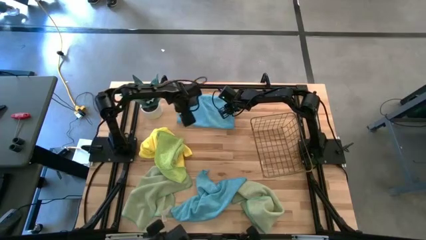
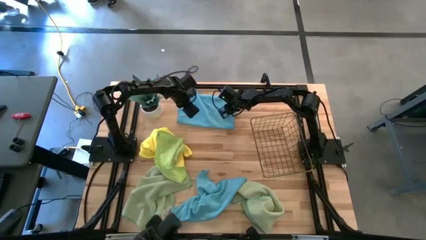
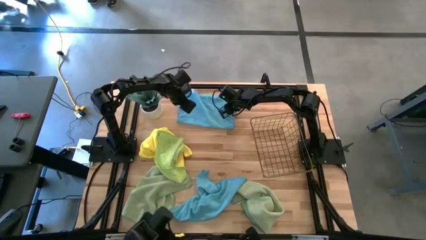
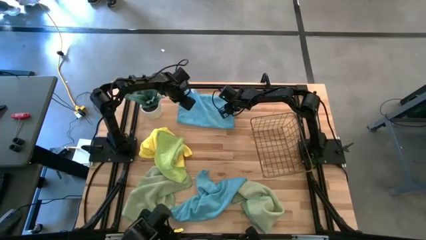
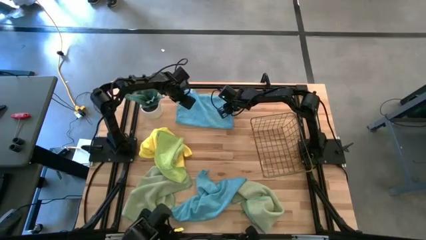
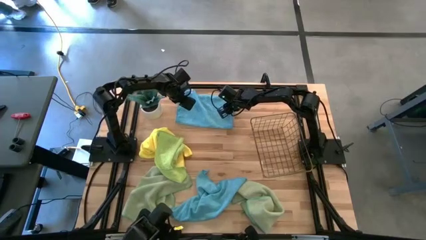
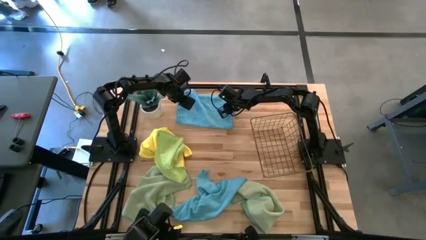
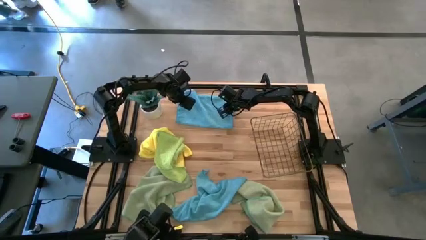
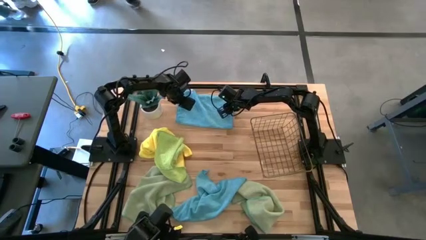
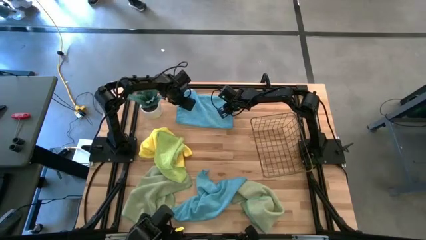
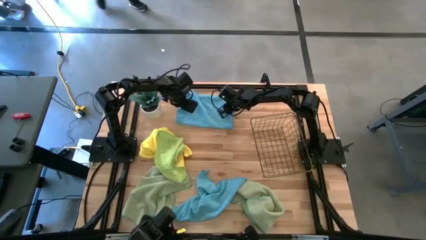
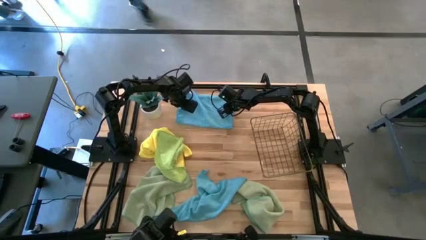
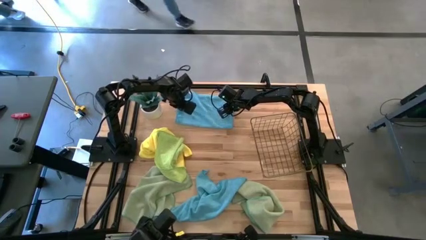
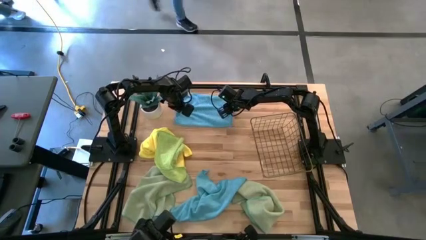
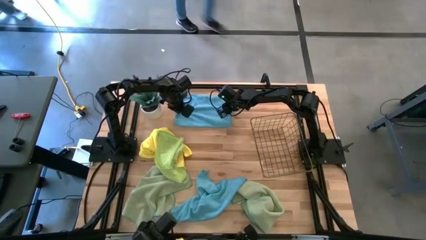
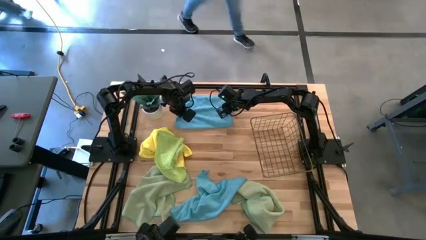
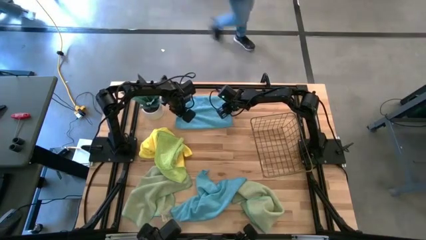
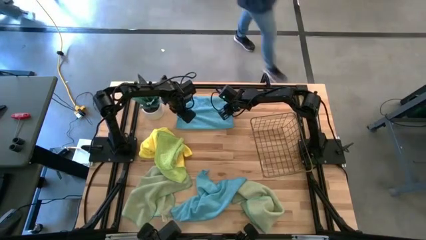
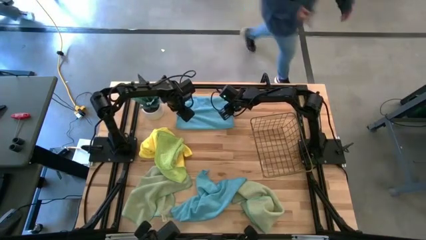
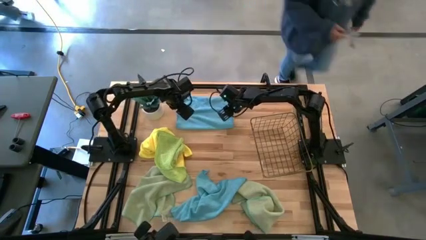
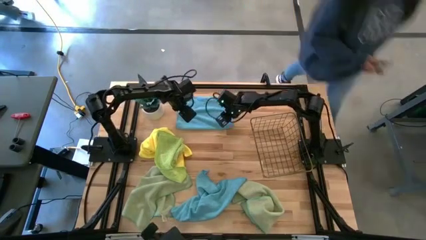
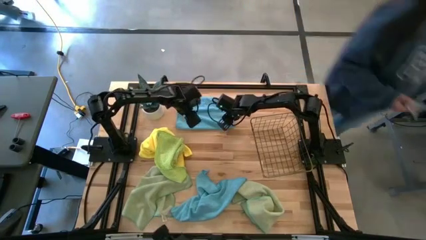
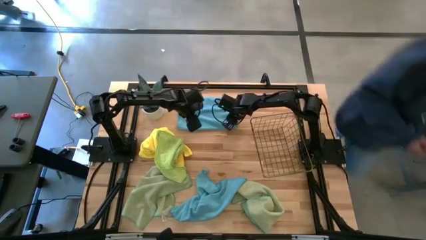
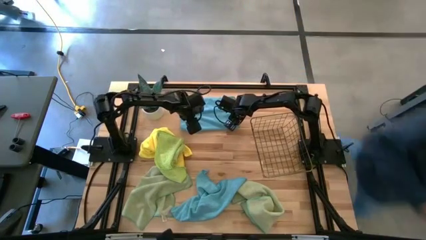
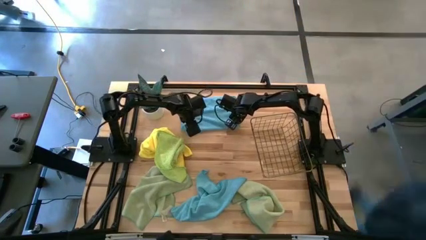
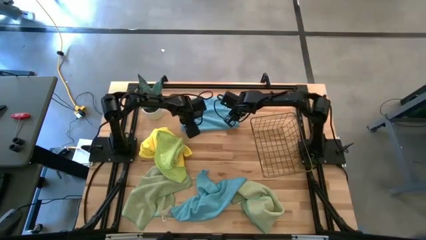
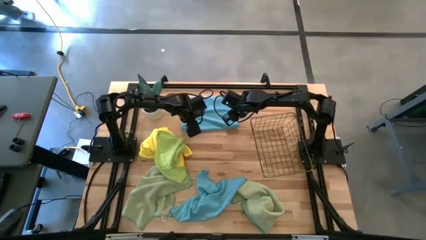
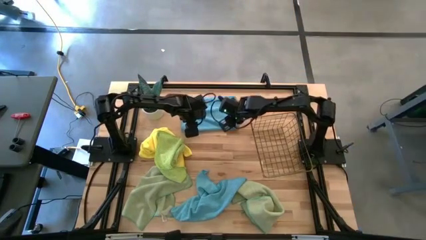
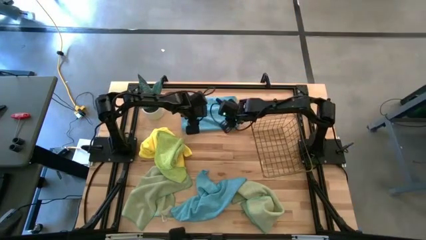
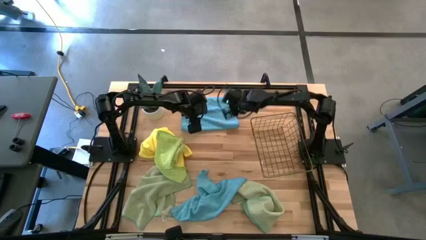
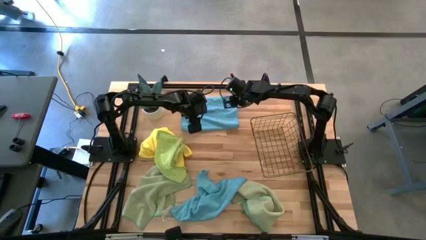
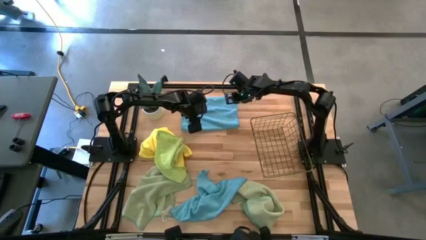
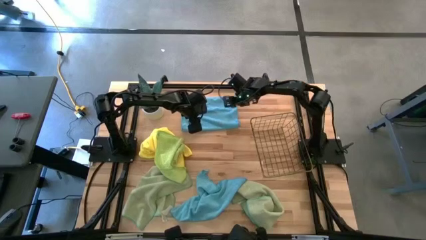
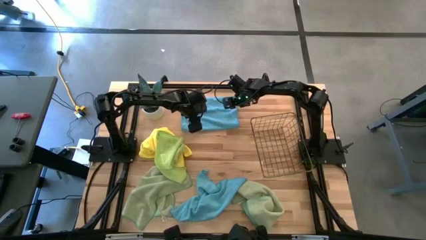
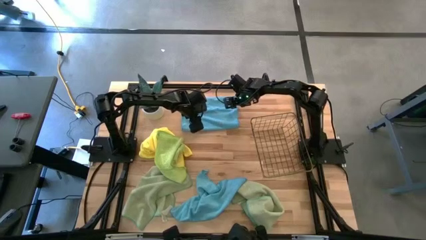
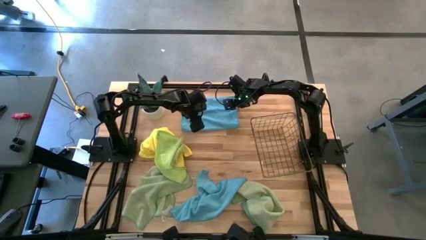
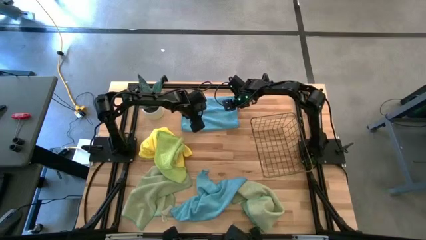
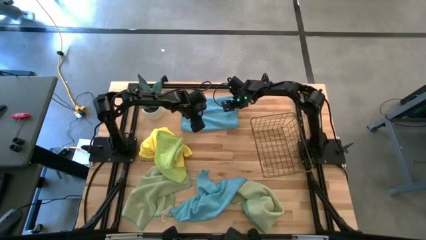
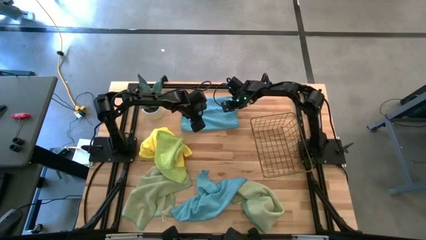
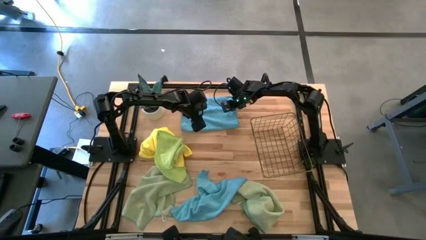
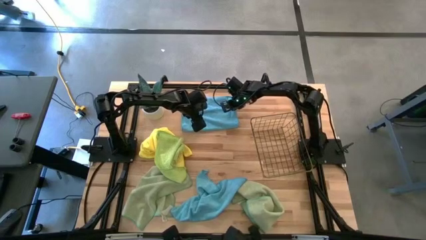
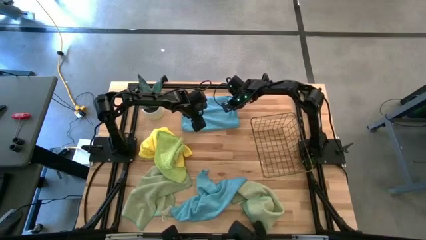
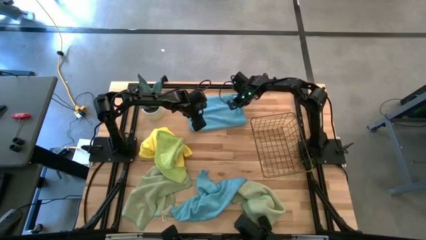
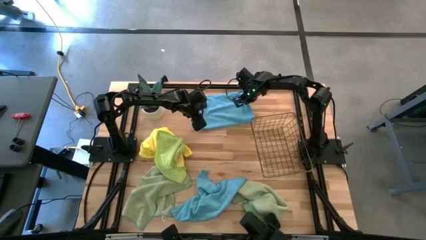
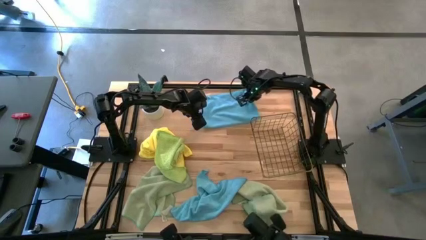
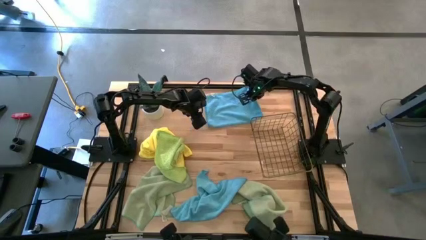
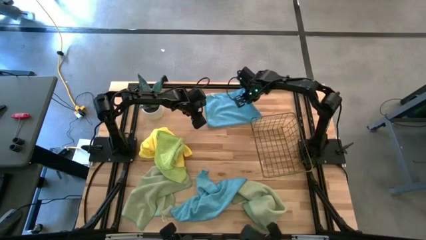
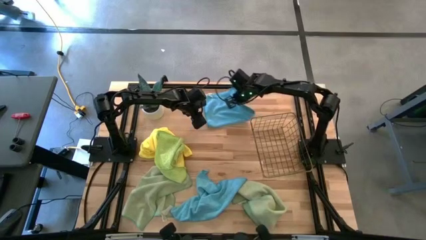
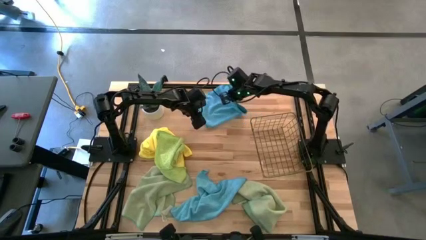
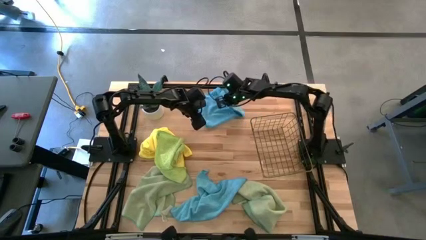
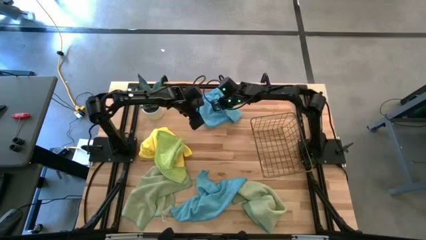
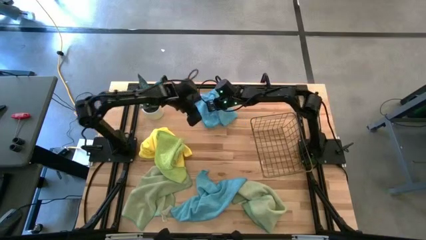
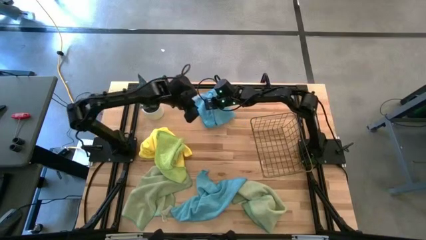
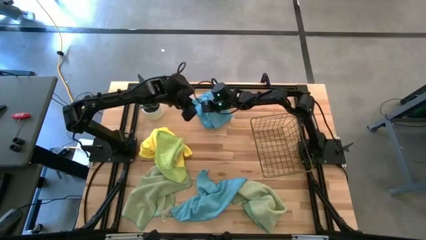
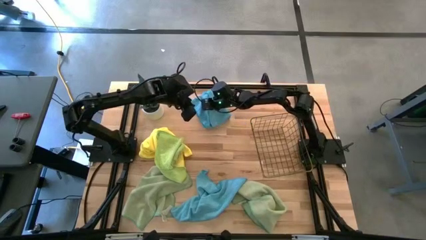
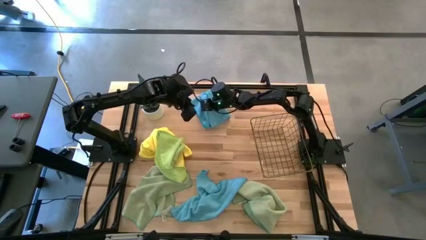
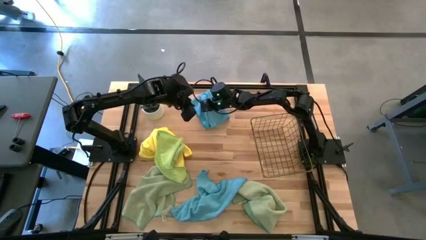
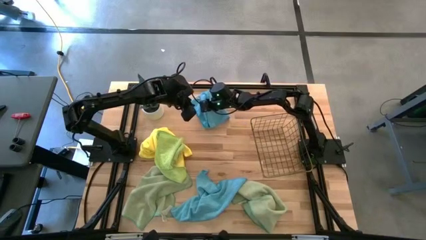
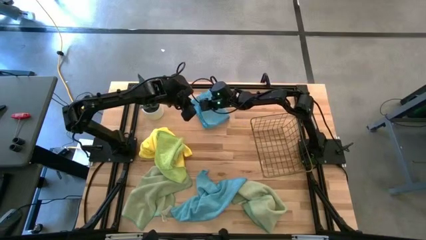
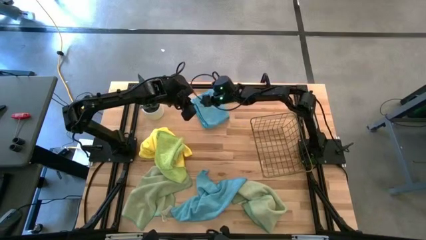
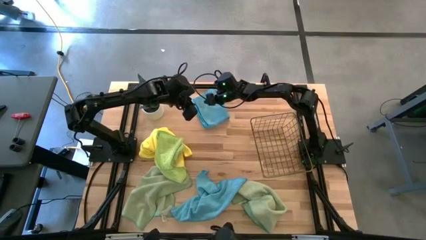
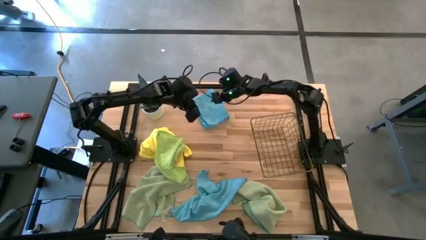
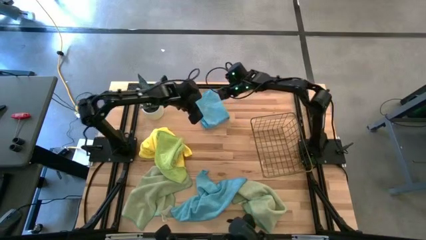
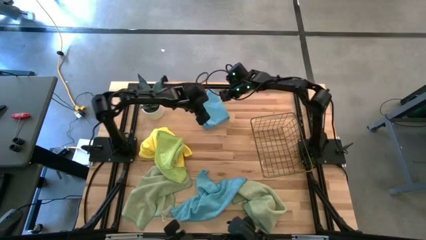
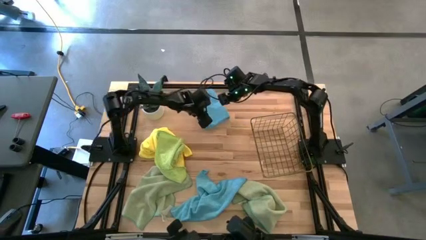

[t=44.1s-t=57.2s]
Task: Fold microfiber towels
Fold the top blue microfiber cloth

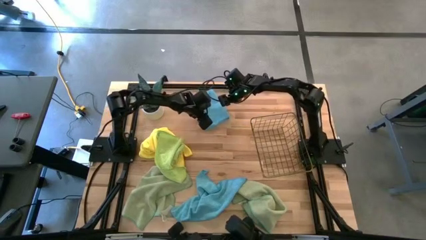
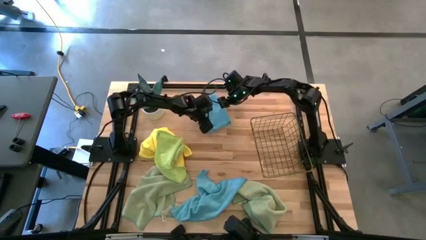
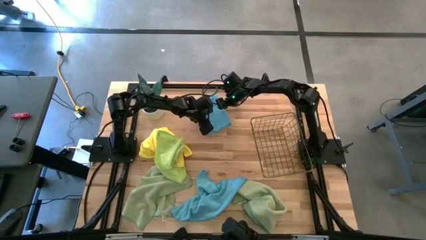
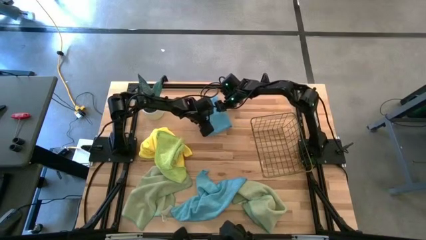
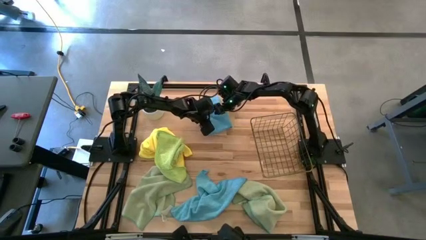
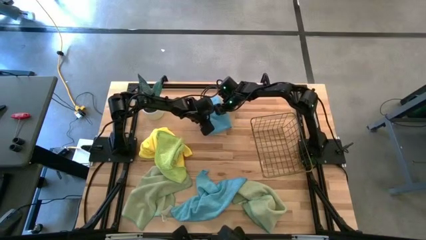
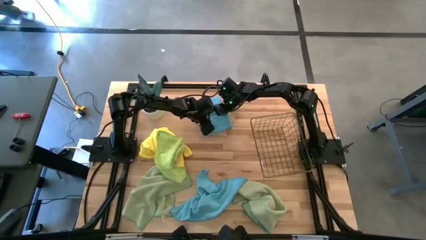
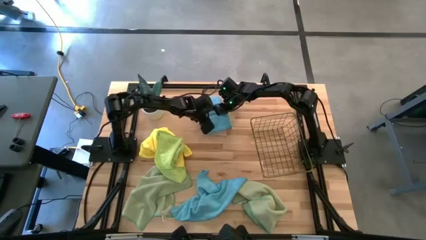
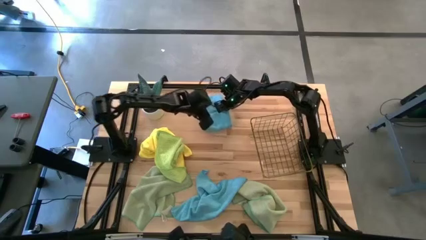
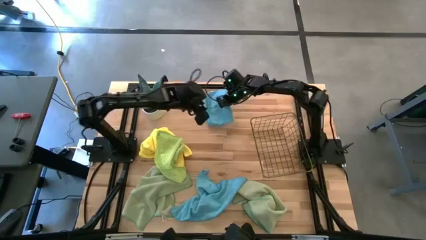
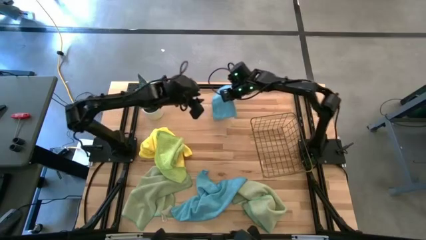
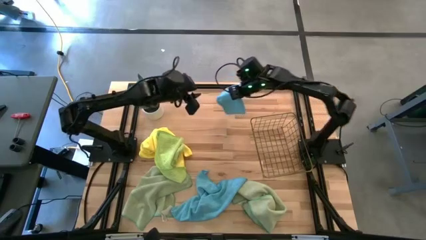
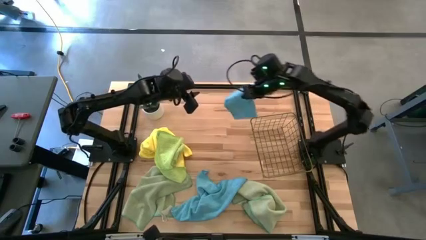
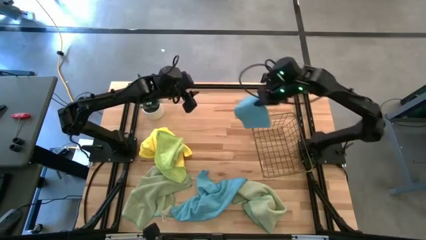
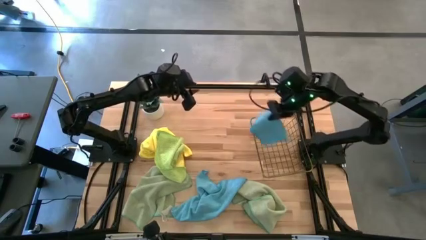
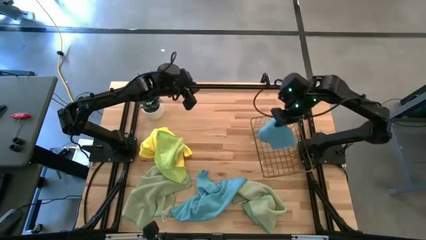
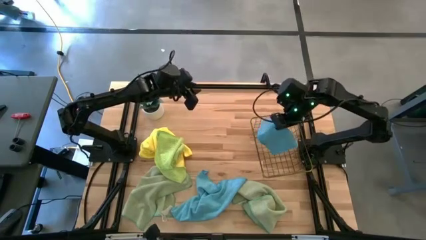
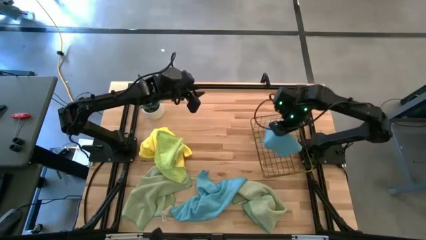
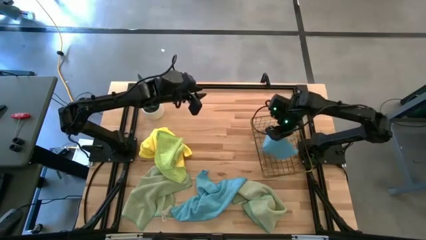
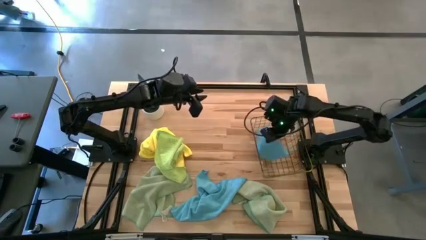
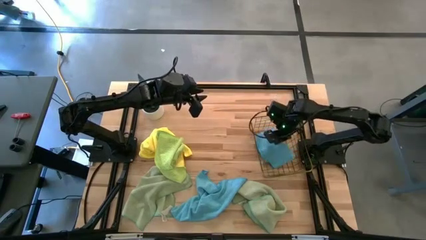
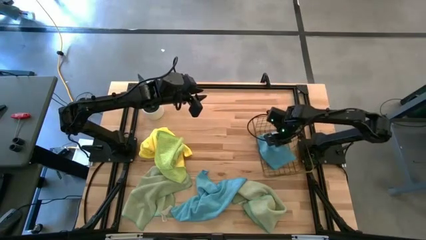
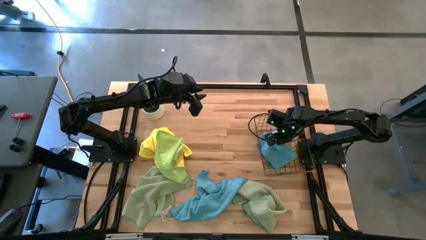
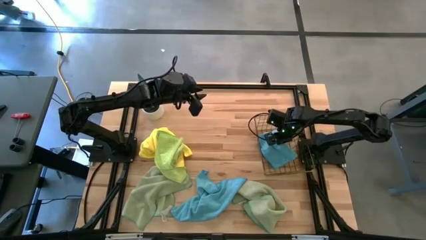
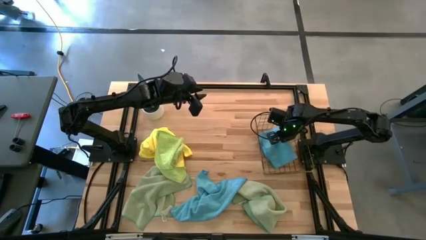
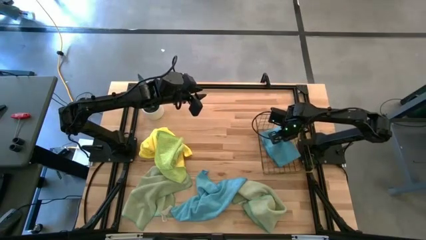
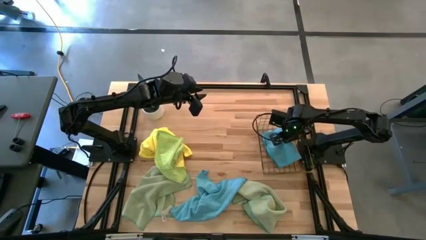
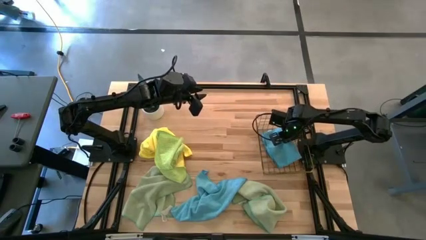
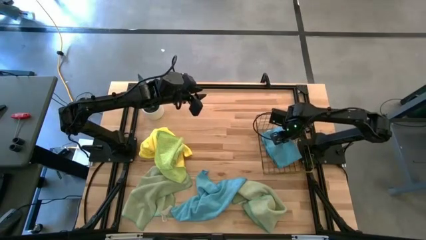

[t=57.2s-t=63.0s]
Put the top blue microfiber cloth into the wire basket
